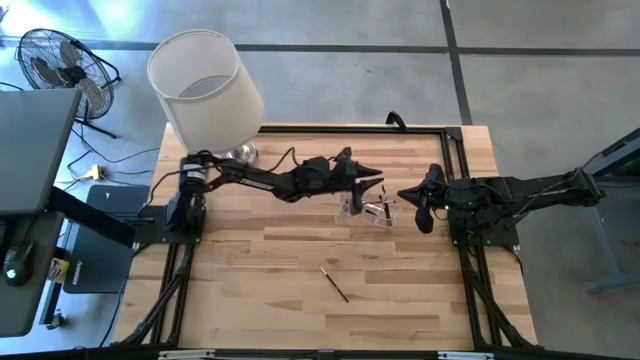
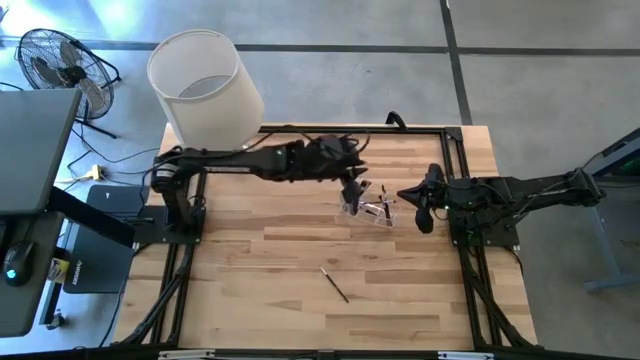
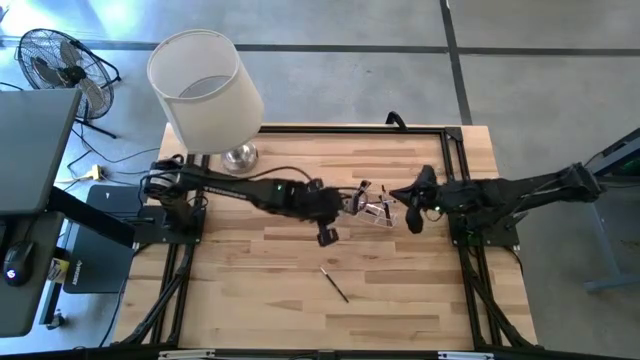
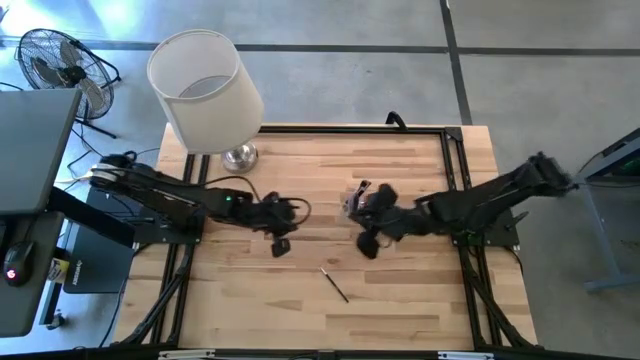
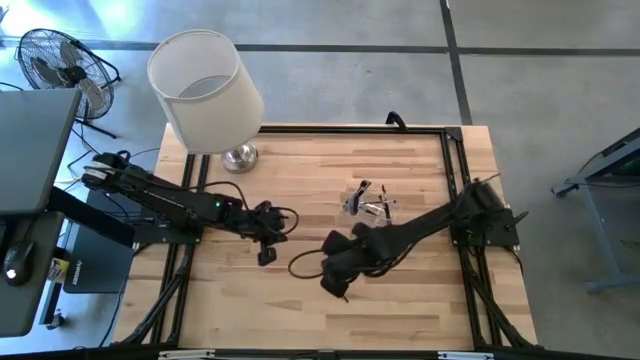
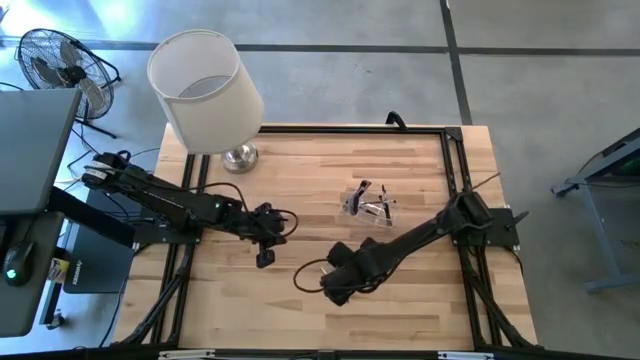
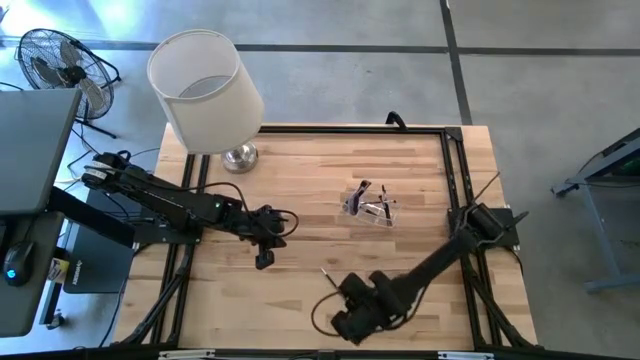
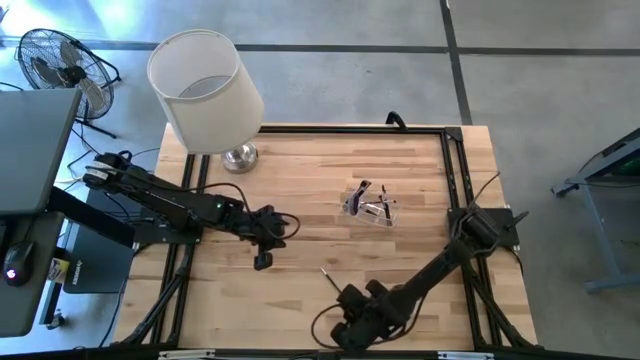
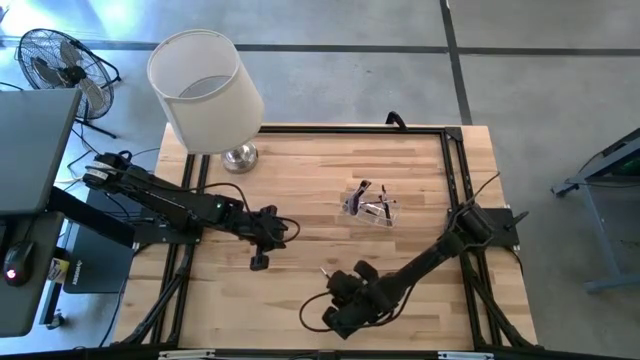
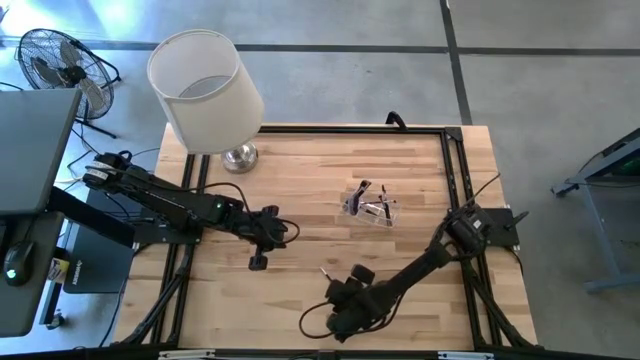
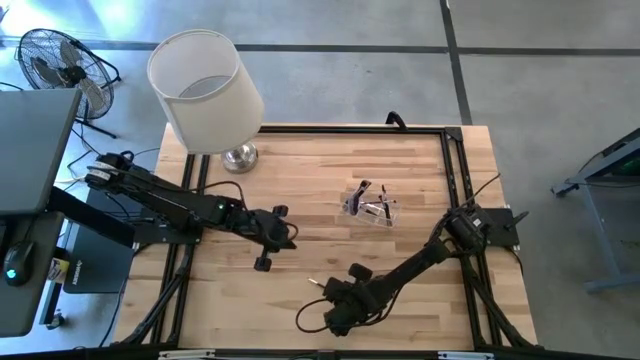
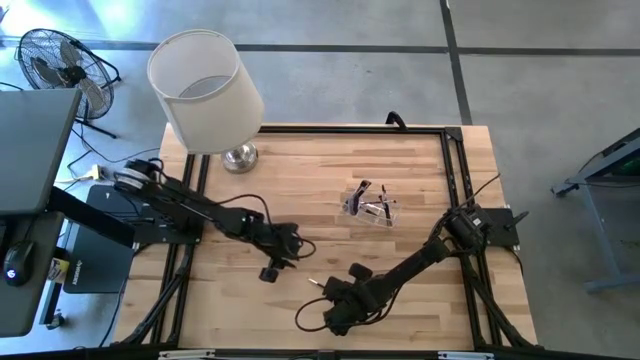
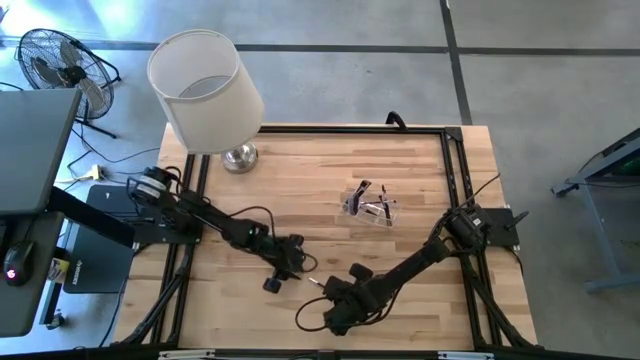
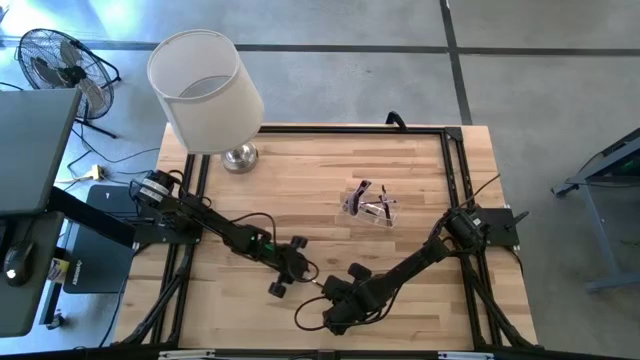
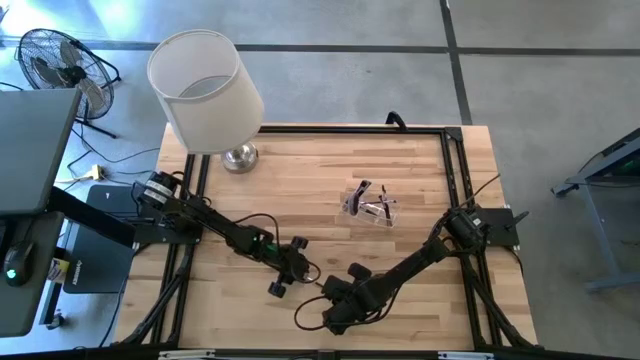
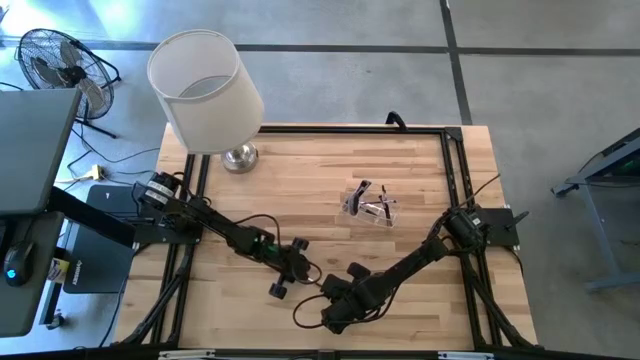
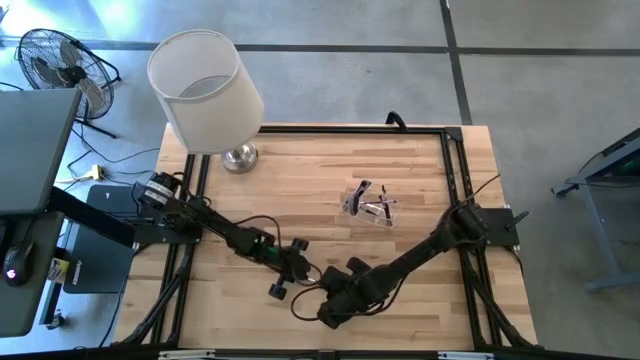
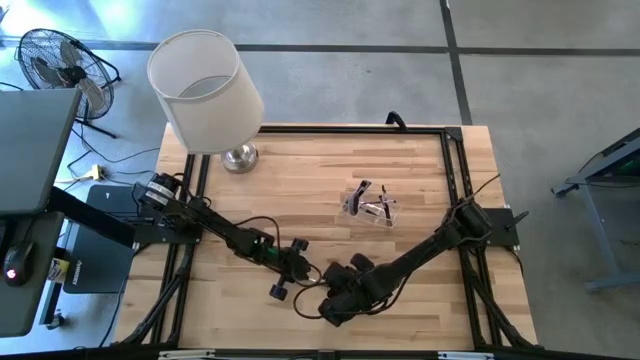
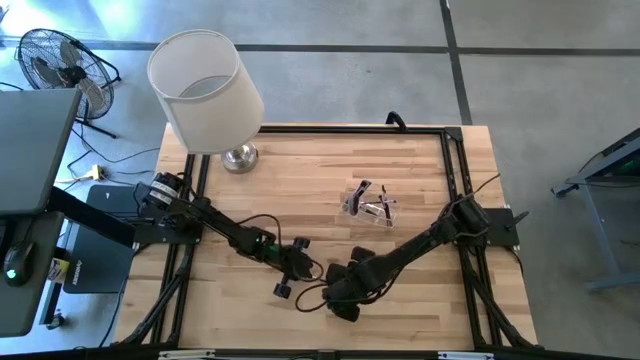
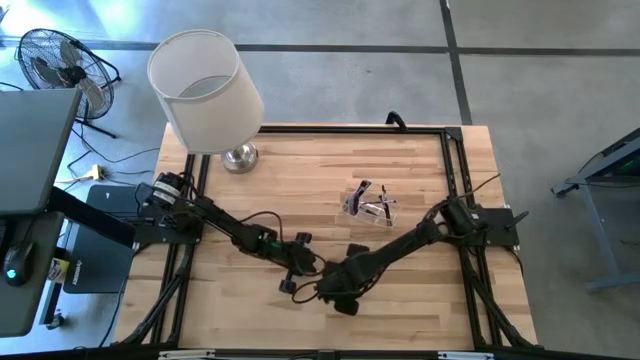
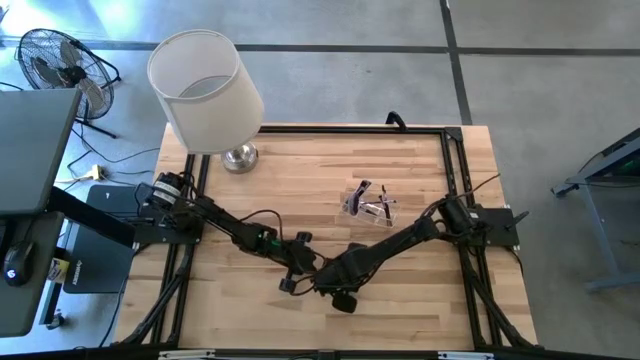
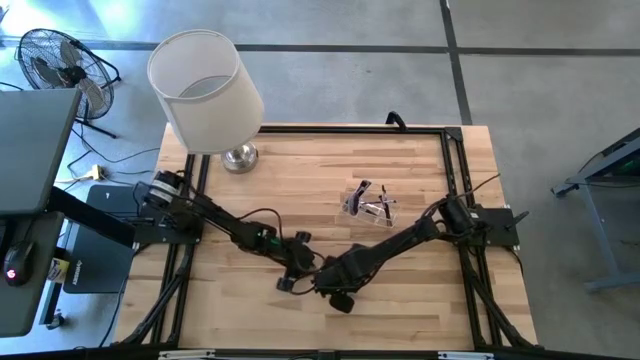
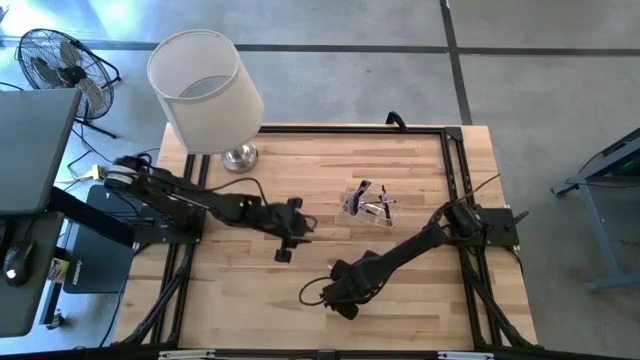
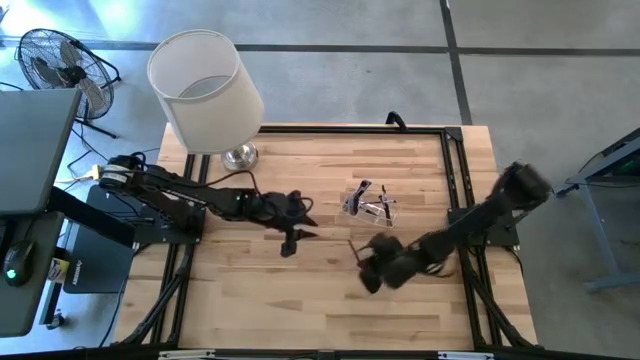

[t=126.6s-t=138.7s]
Task: Put items in baskets/containers
Put the black liner brush into the transparent organizer

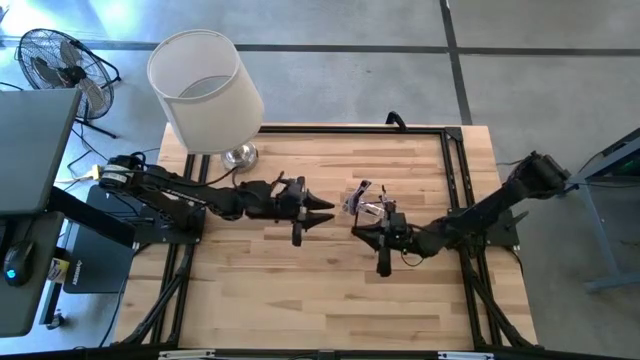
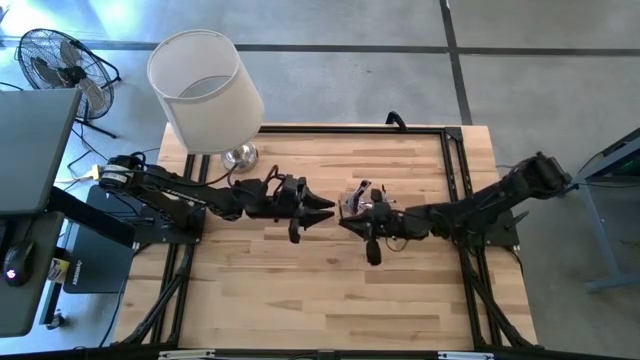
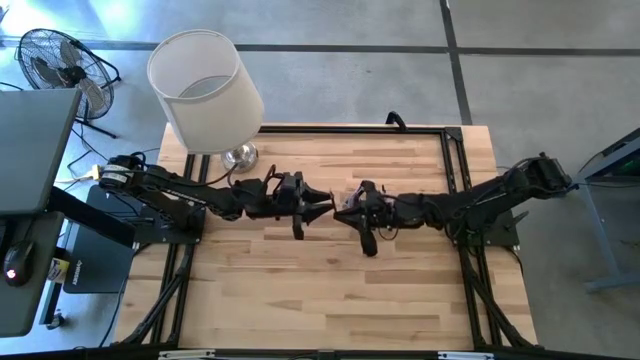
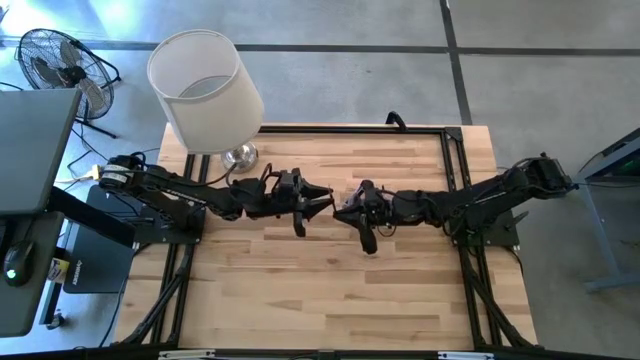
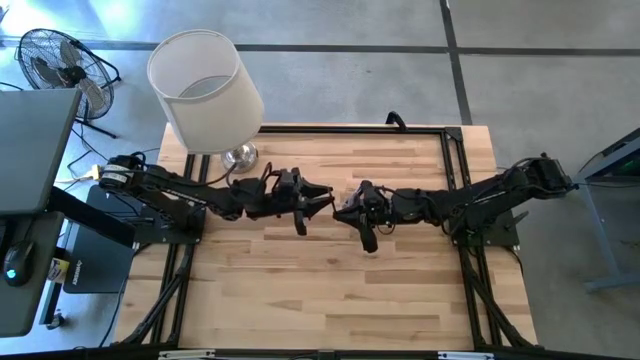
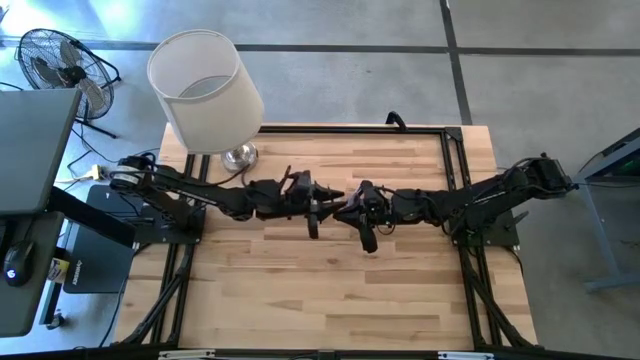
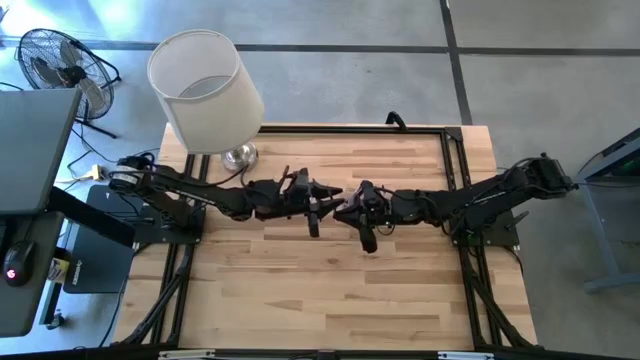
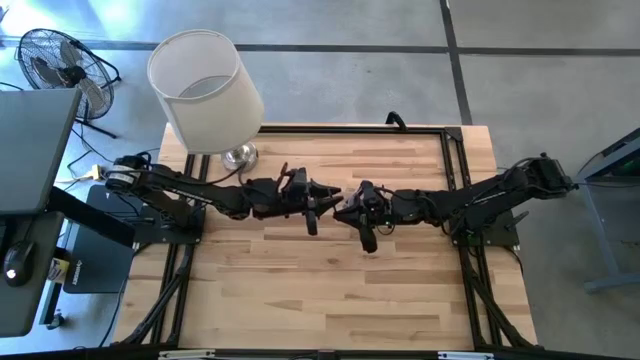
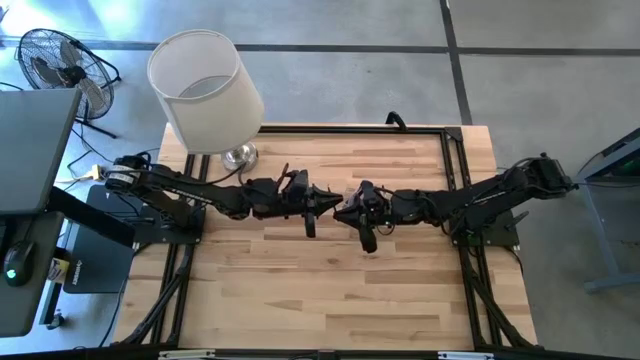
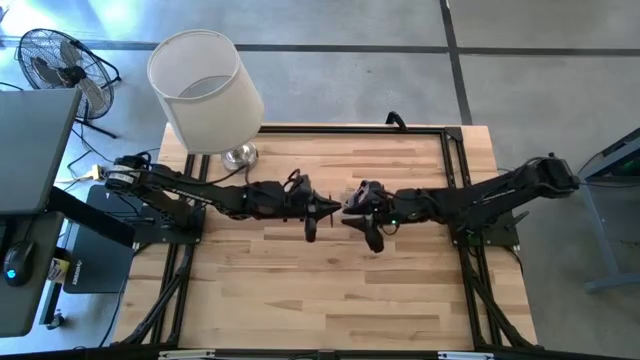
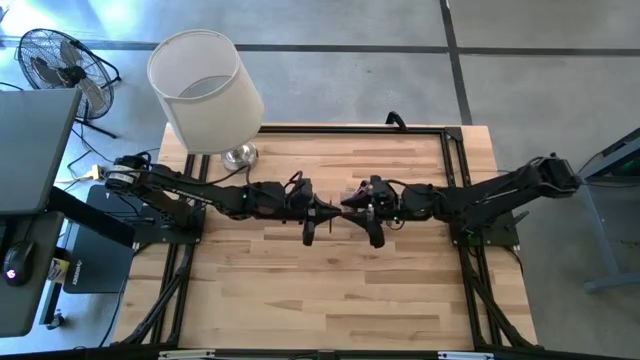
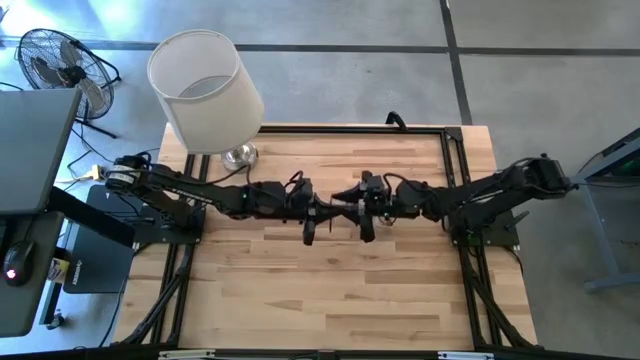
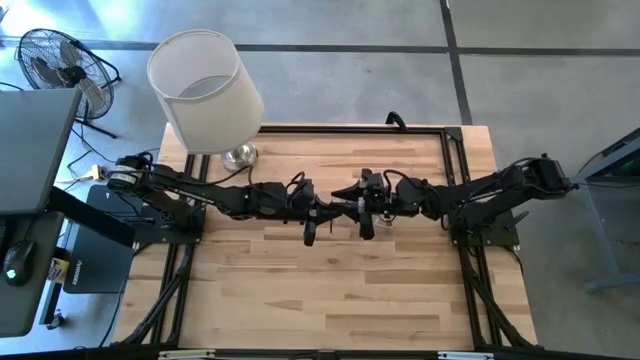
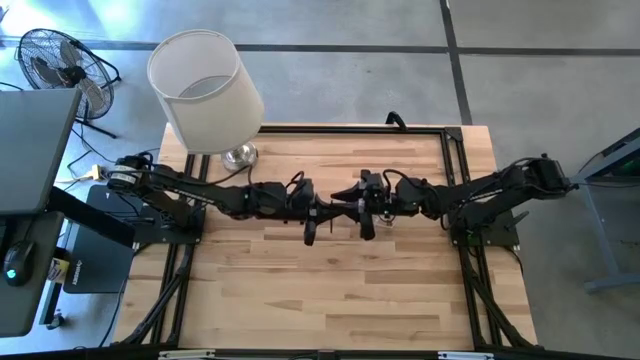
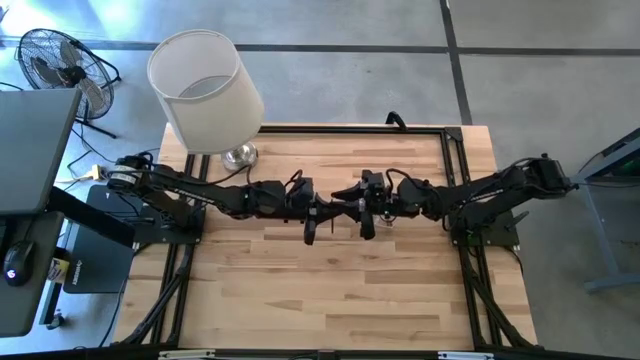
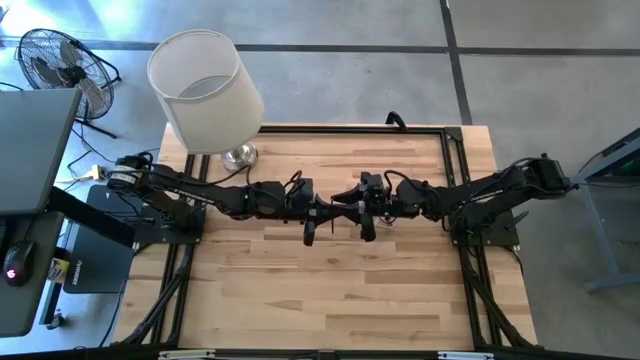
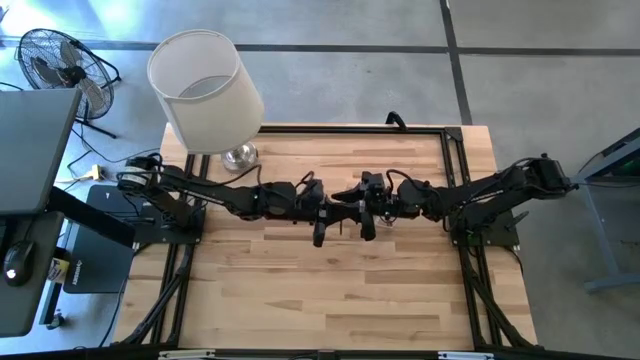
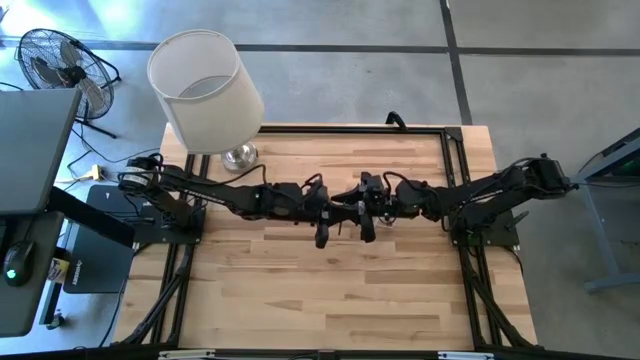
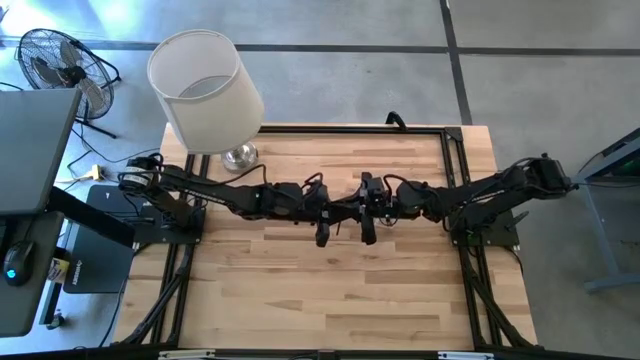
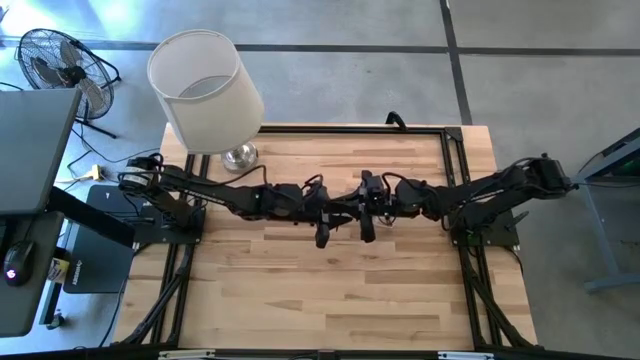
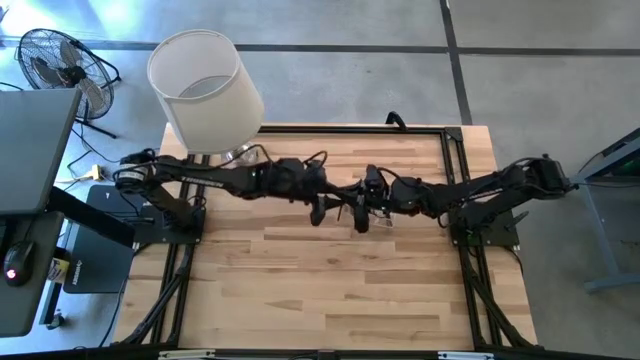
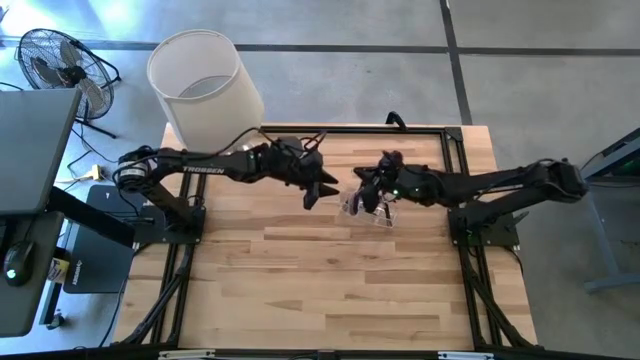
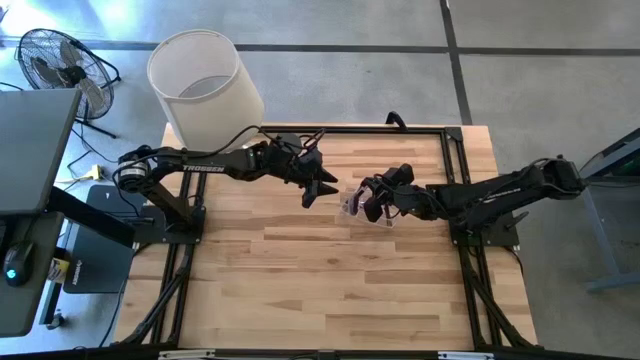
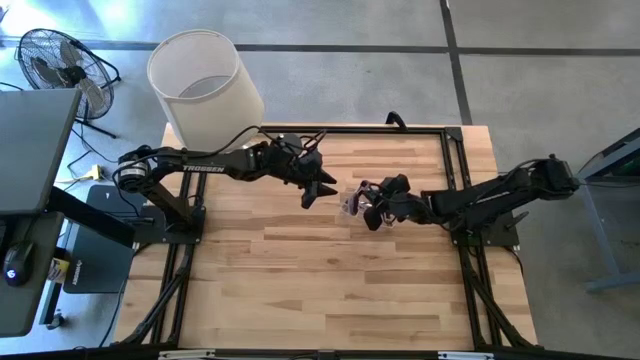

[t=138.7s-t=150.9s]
Put the black liner brush into the transparent organizer
